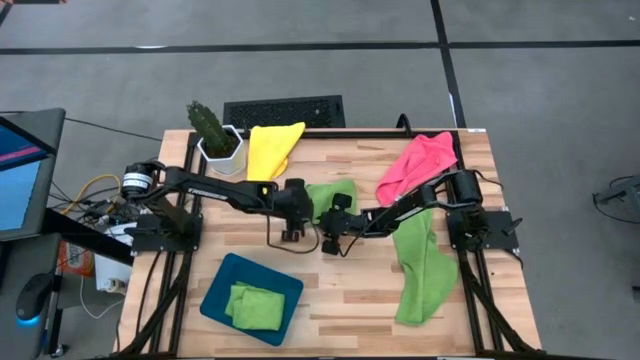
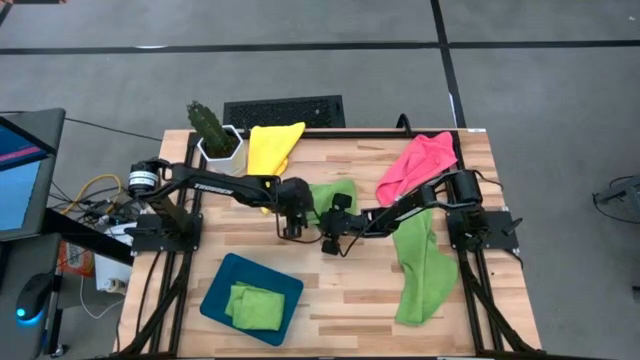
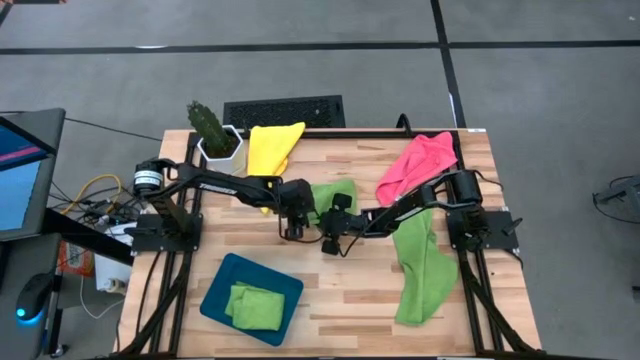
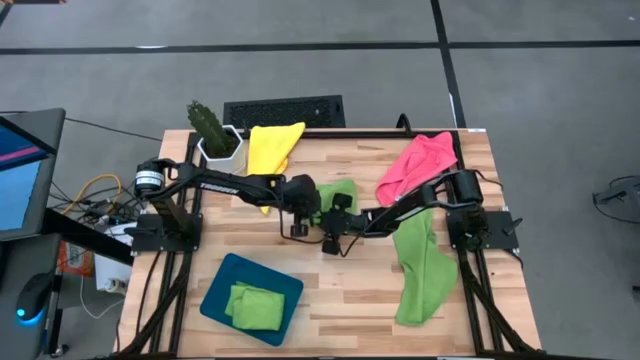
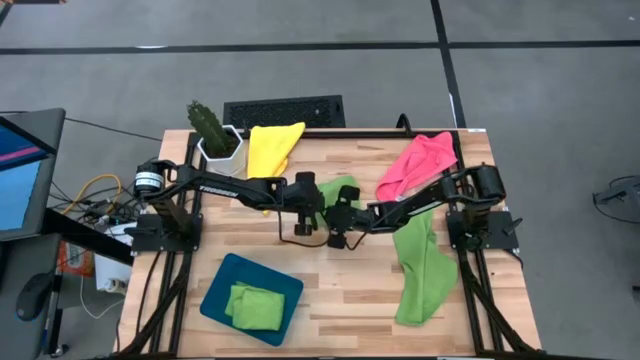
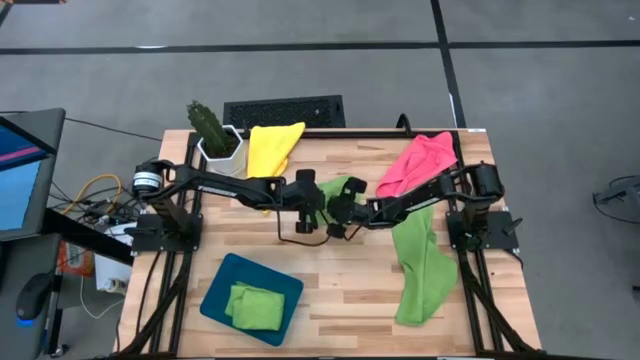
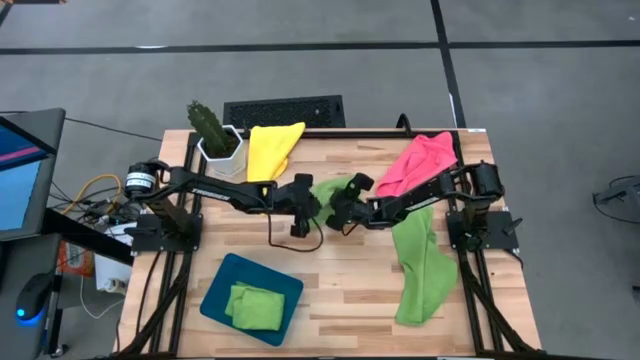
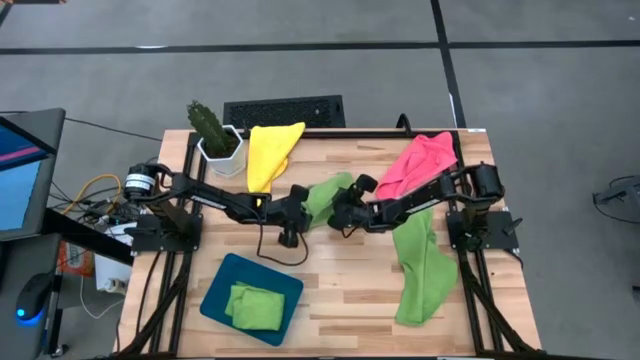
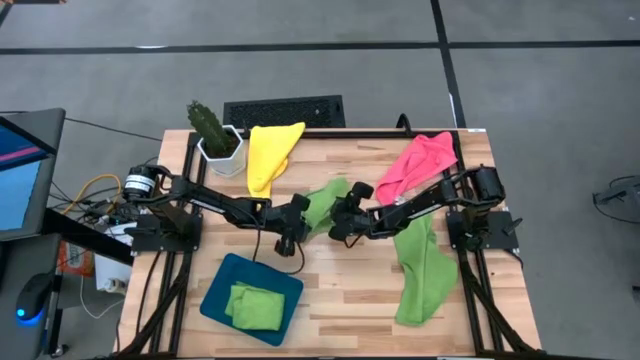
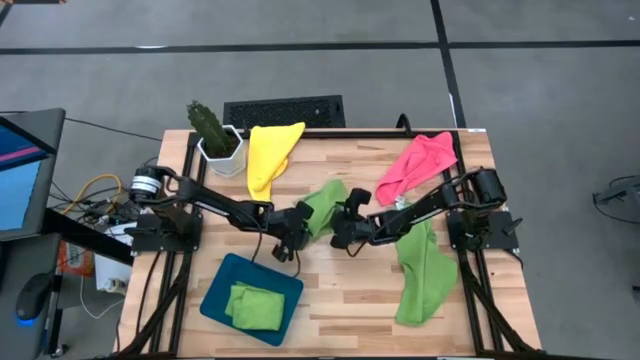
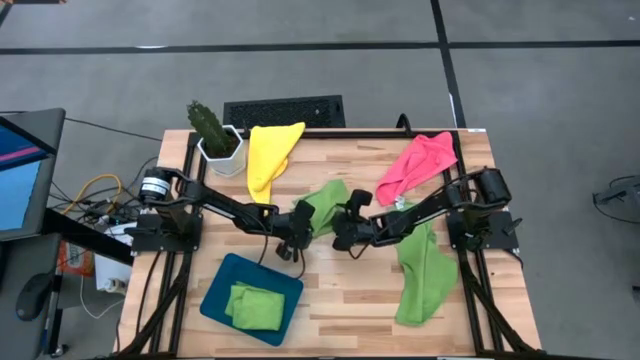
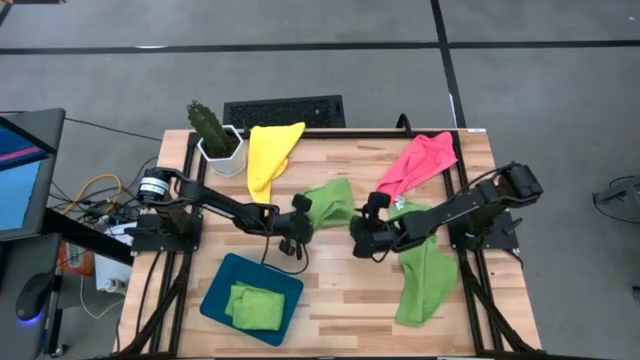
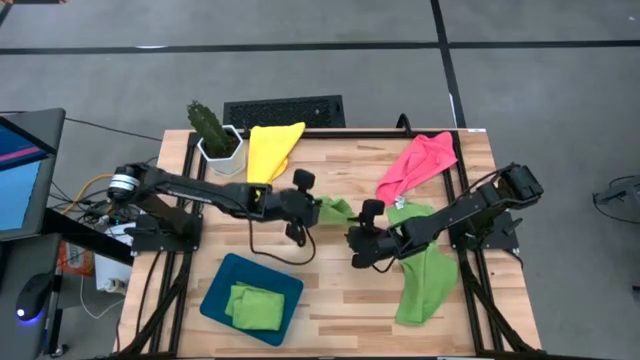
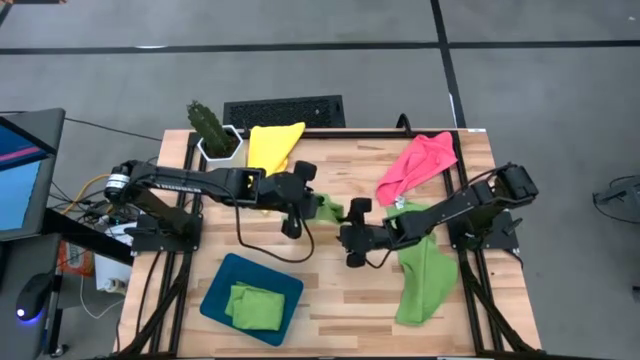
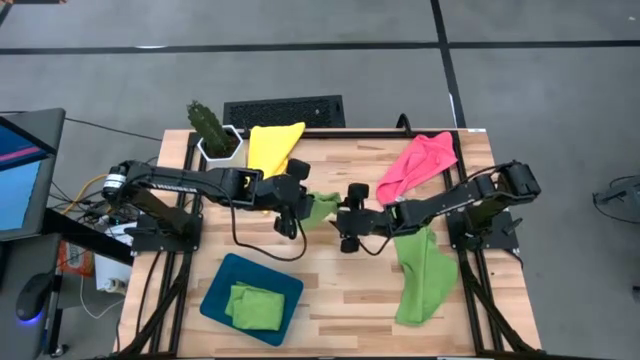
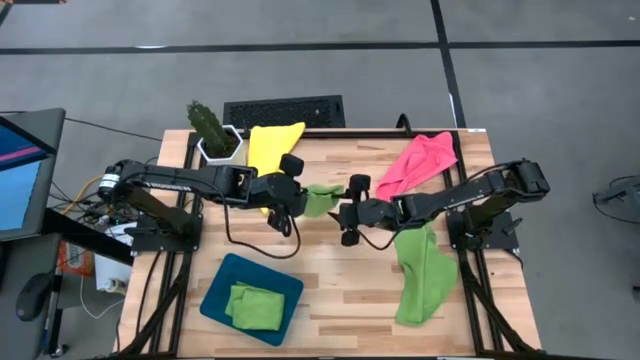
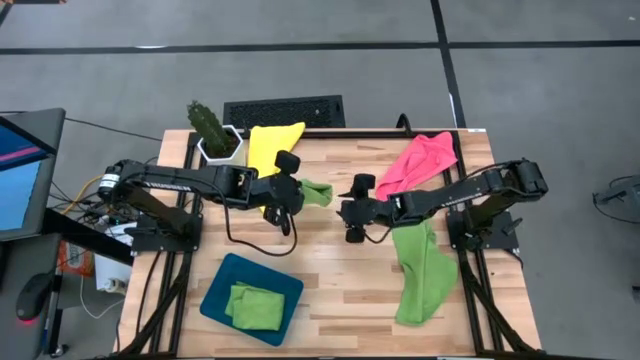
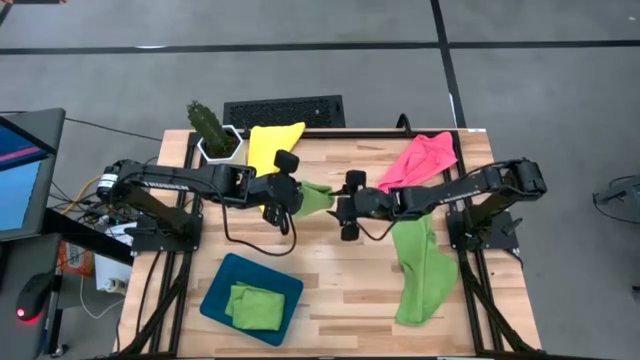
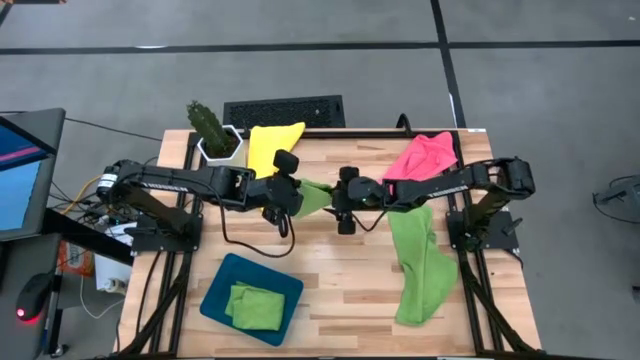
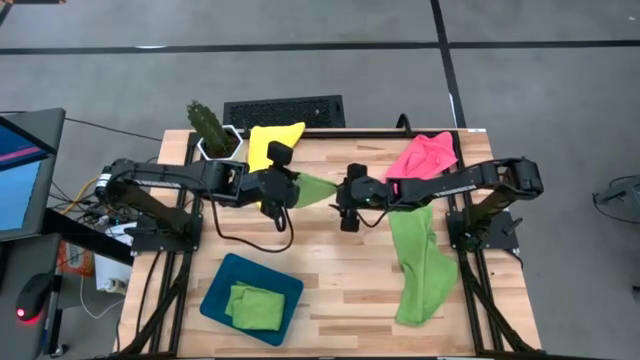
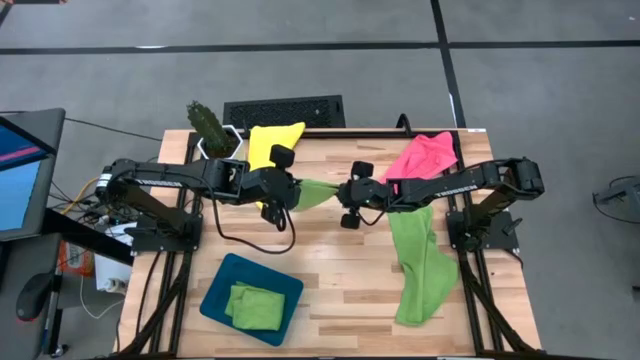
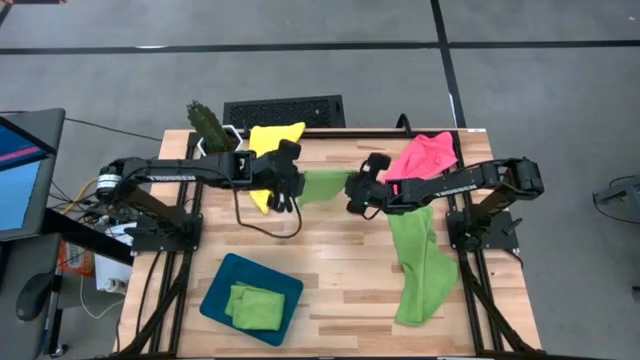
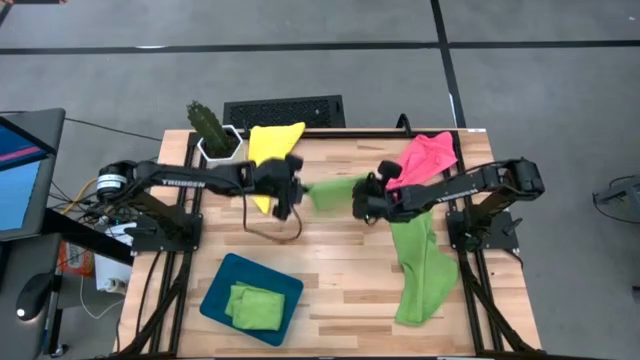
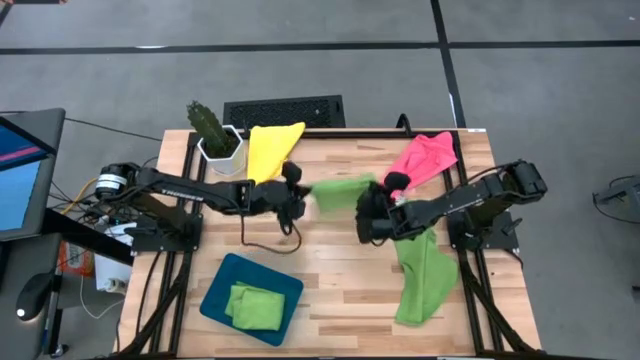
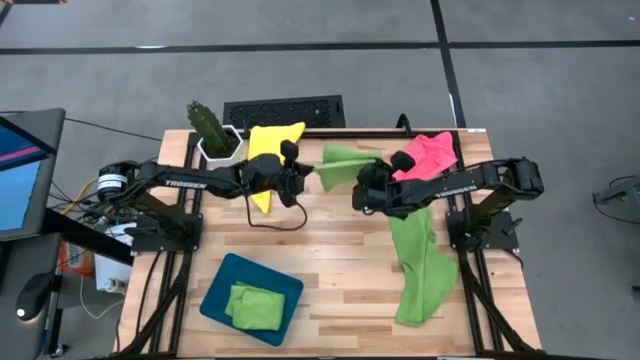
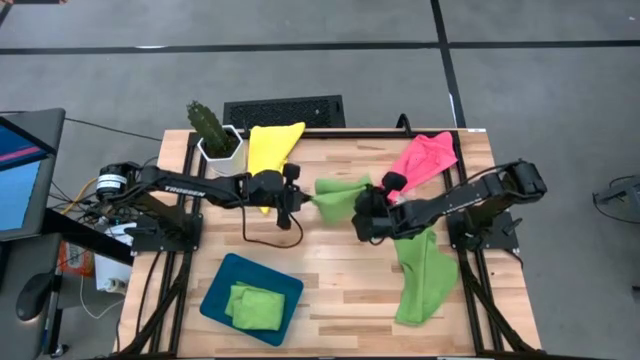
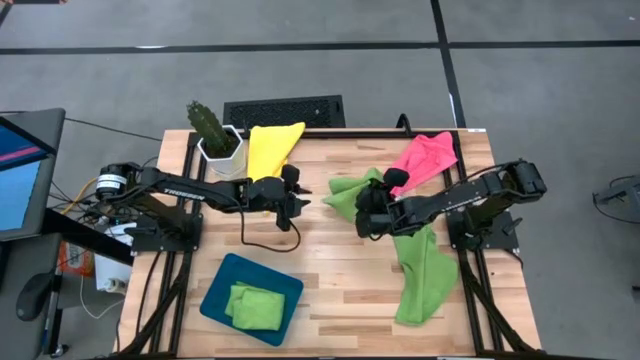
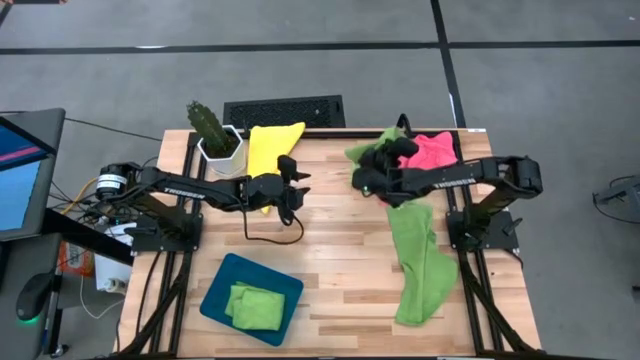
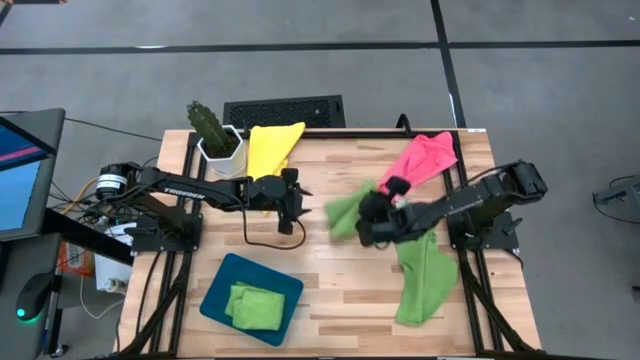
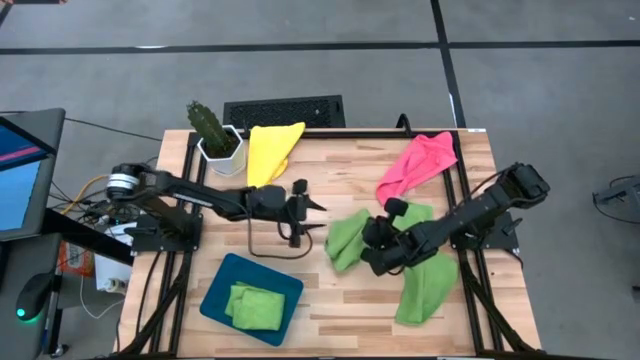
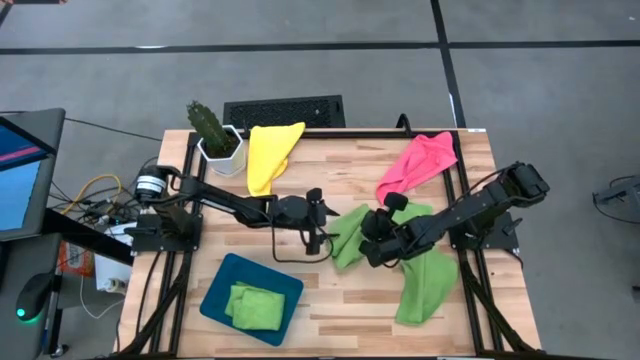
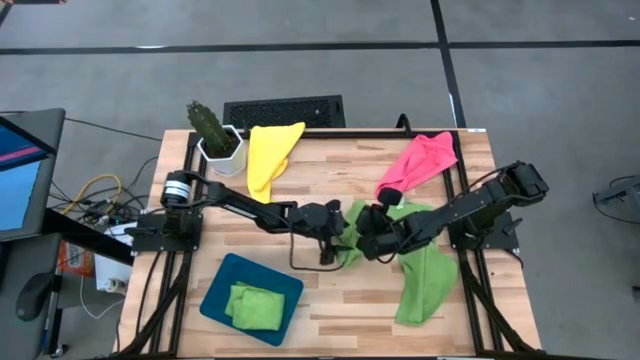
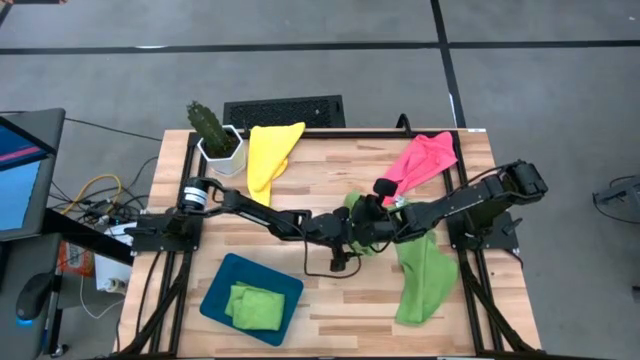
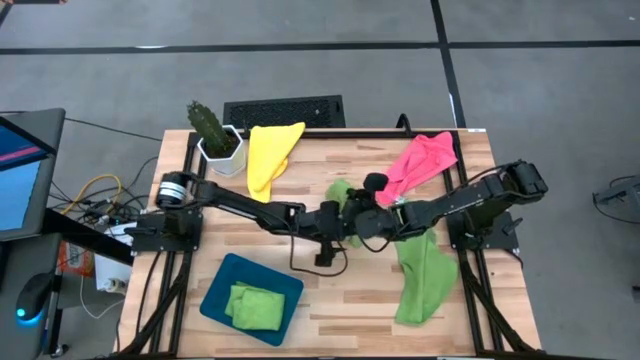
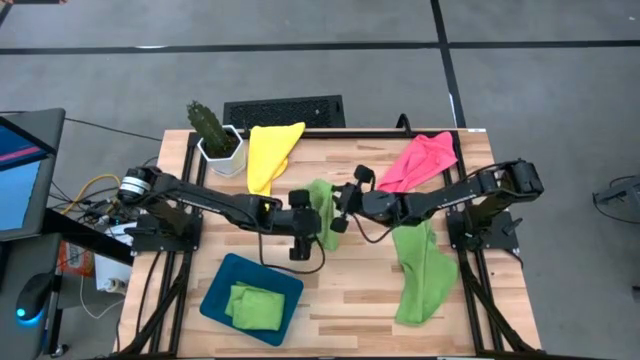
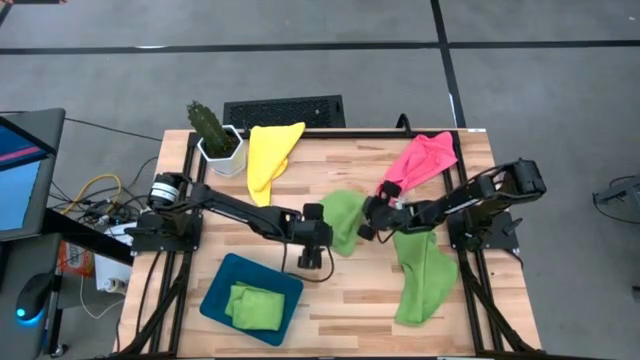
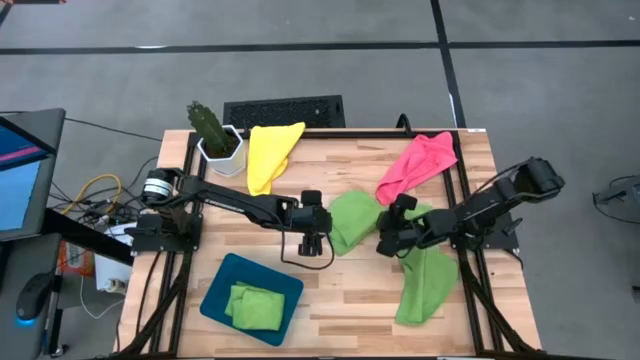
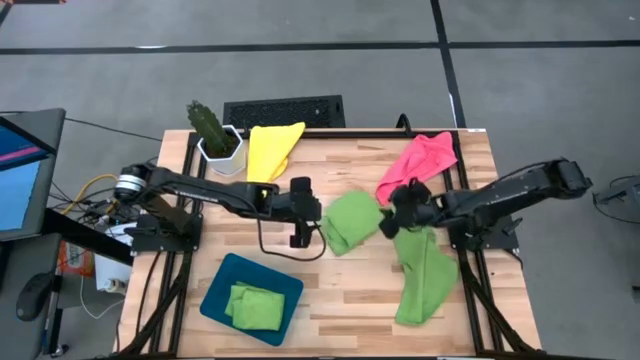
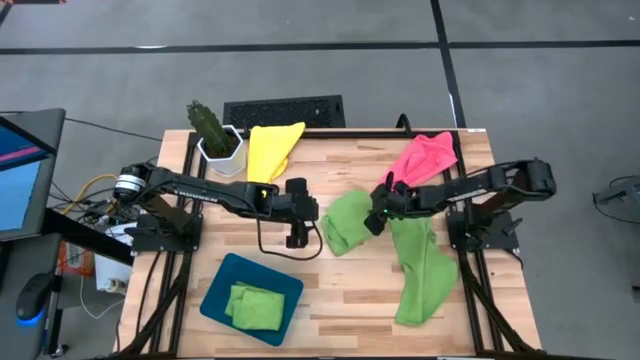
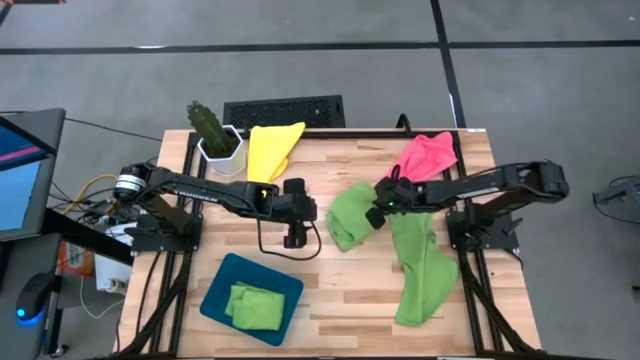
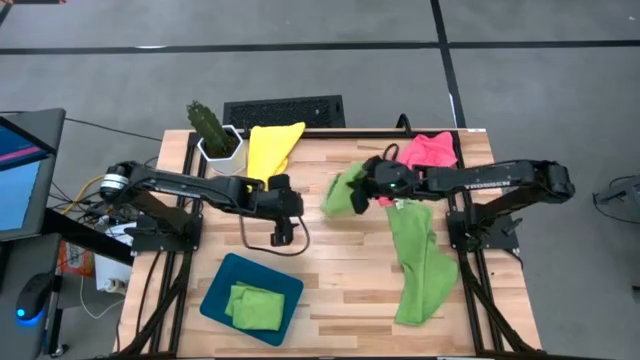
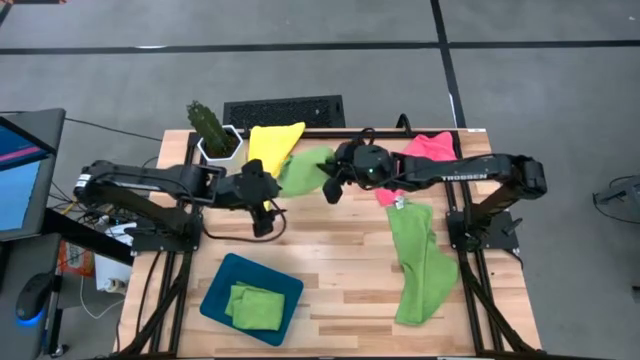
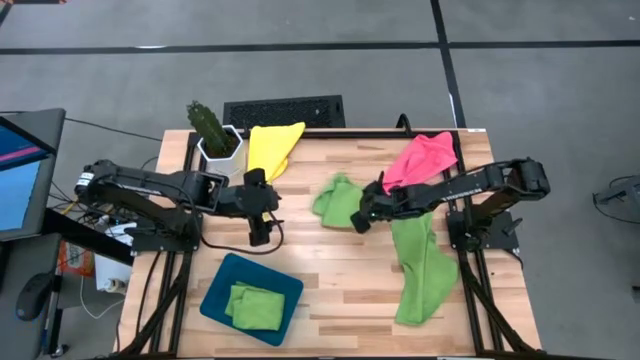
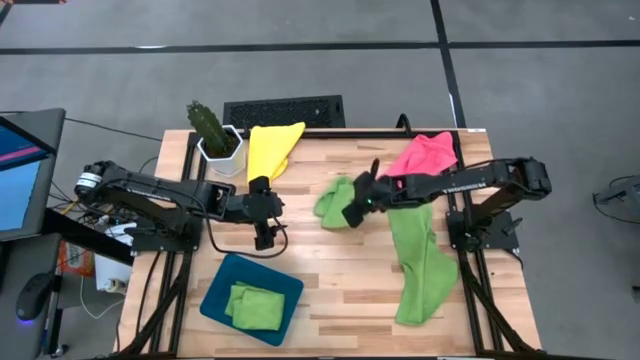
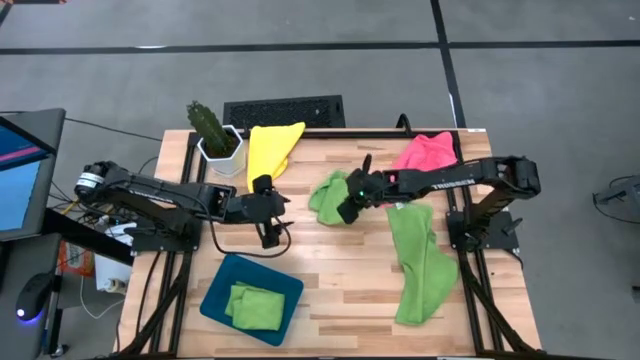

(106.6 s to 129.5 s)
Task: Fold microfiber towels
Fold the top green microfiber
